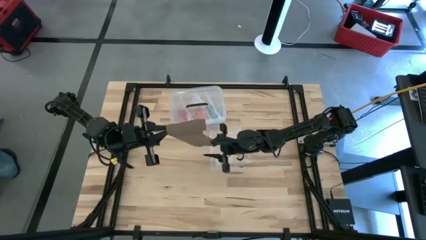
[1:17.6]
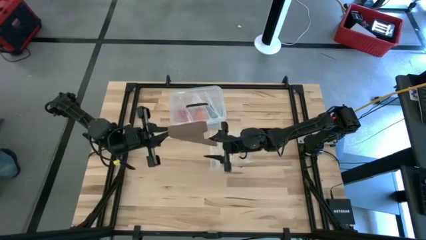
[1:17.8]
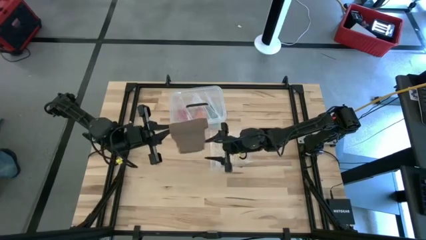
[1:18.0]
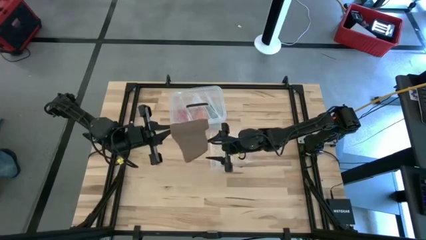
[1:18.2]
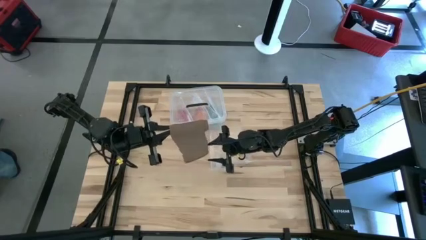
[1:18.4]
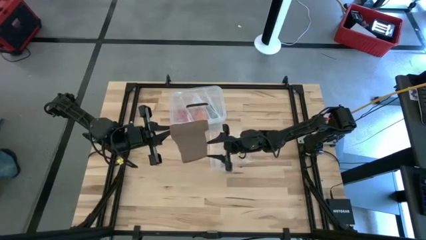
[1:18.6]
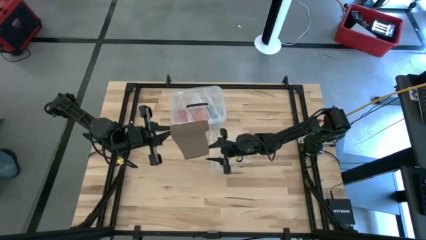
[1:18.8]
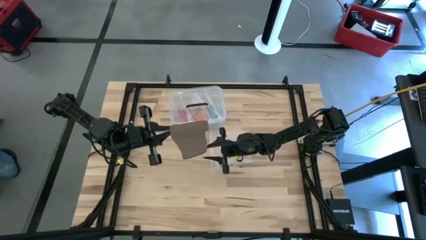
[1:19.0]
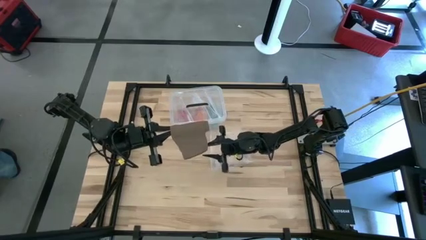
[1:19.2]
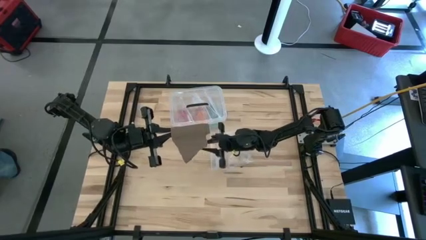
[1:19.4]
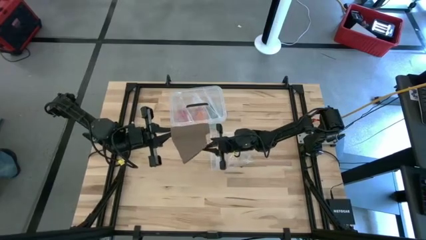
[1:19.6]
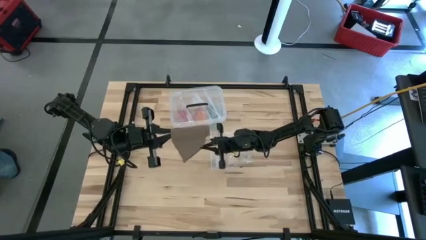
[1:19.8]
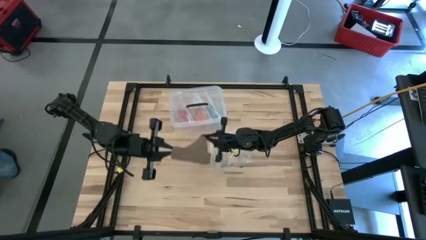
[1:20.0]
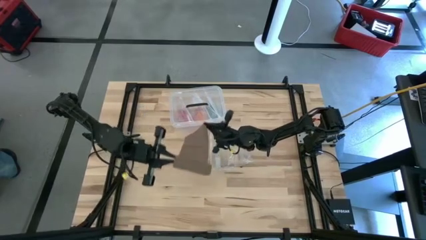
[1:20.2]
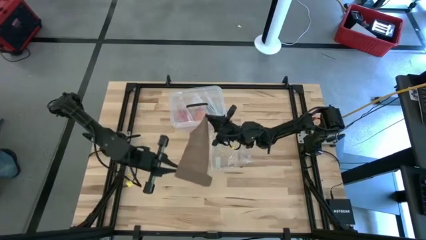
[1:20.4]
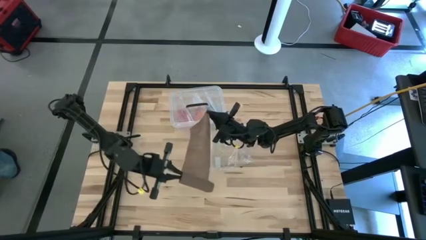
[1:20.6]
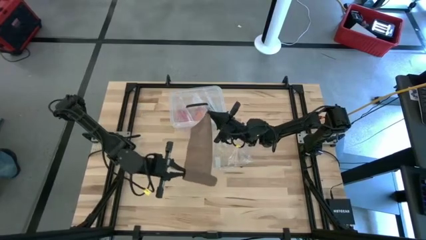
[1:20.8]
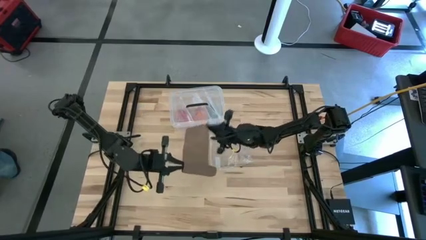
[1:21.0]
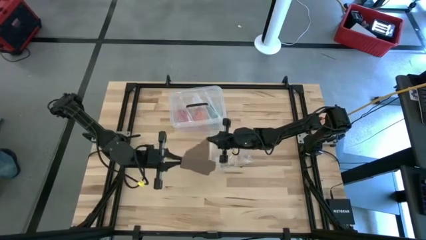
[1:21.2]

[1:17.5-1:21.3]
Task: Roll bandage
Roll the brown bandage

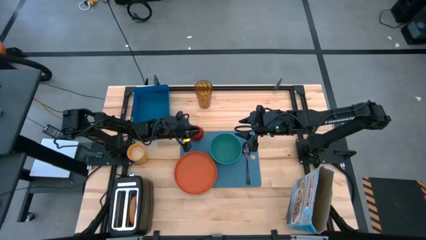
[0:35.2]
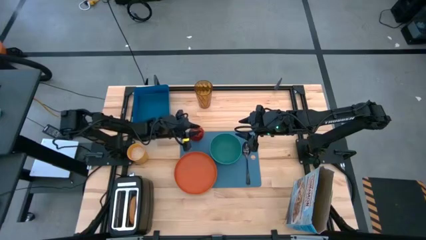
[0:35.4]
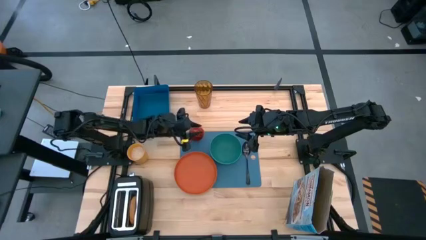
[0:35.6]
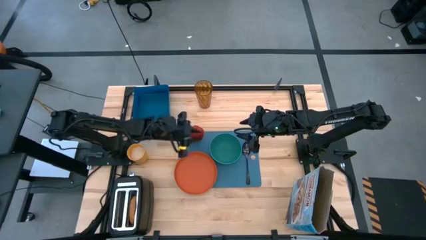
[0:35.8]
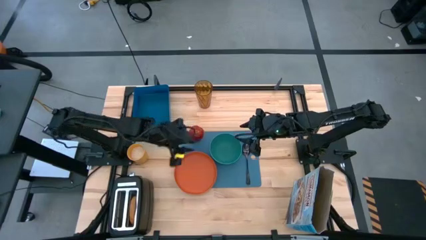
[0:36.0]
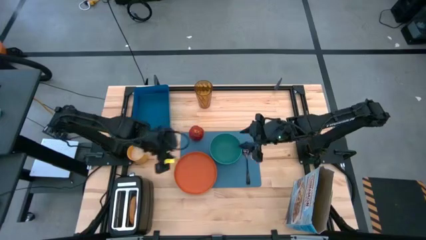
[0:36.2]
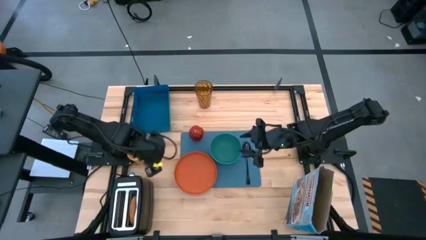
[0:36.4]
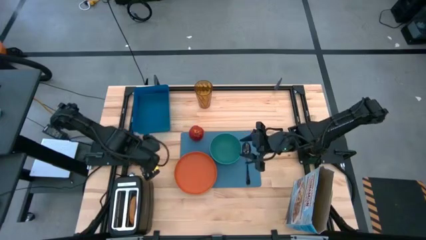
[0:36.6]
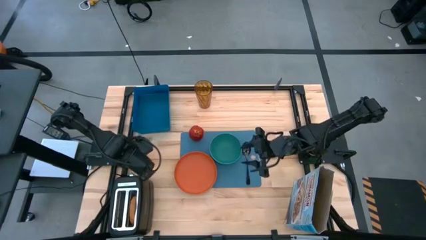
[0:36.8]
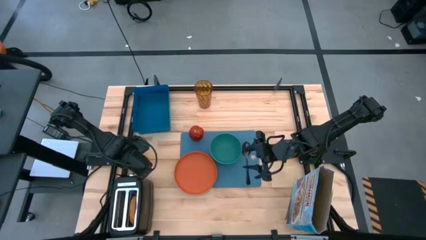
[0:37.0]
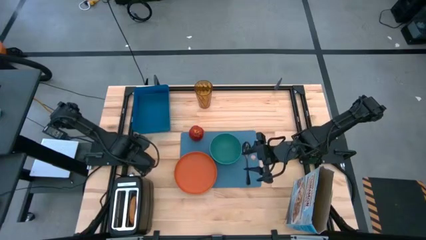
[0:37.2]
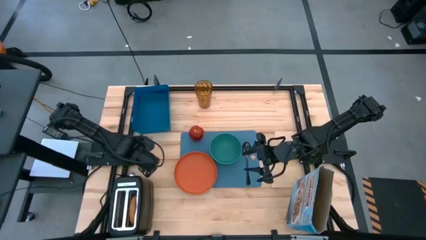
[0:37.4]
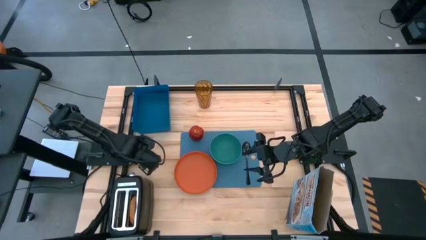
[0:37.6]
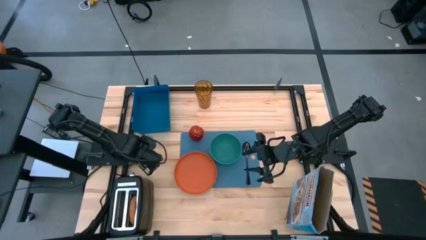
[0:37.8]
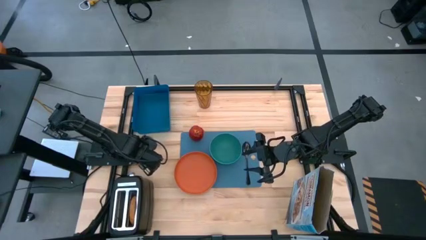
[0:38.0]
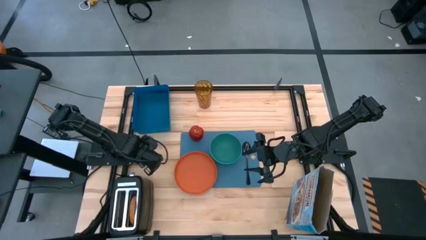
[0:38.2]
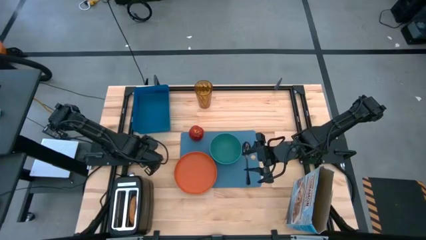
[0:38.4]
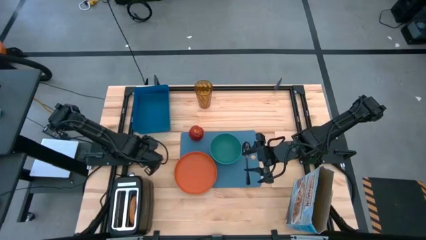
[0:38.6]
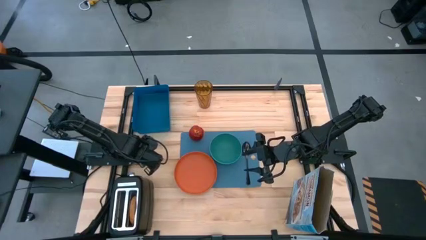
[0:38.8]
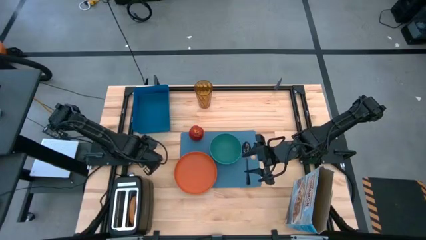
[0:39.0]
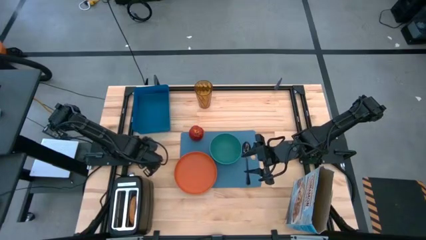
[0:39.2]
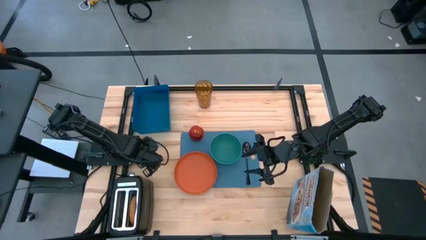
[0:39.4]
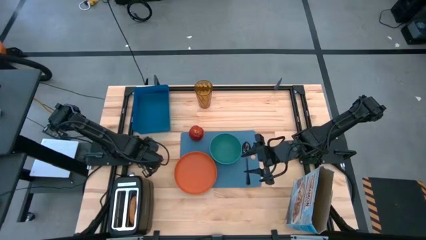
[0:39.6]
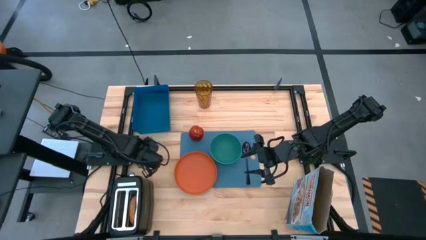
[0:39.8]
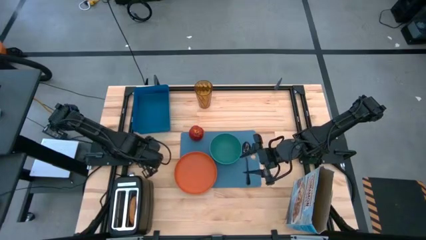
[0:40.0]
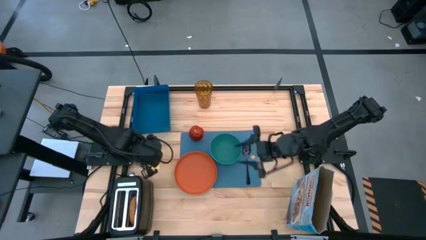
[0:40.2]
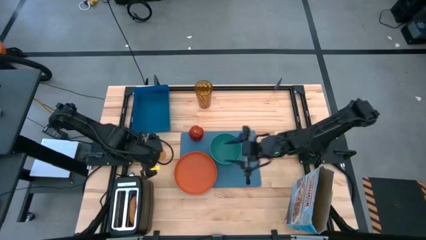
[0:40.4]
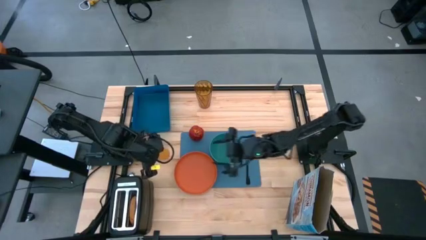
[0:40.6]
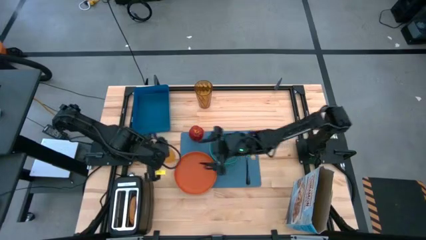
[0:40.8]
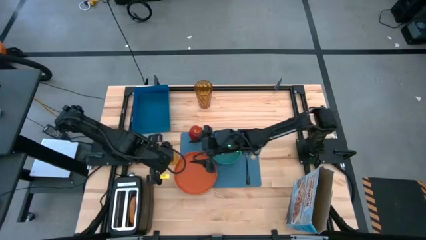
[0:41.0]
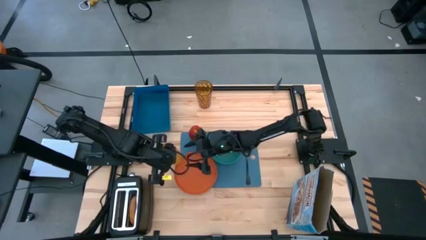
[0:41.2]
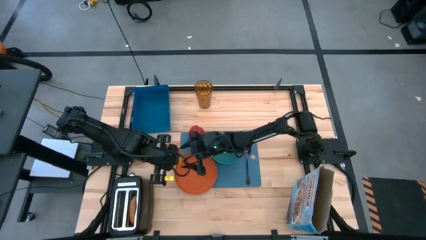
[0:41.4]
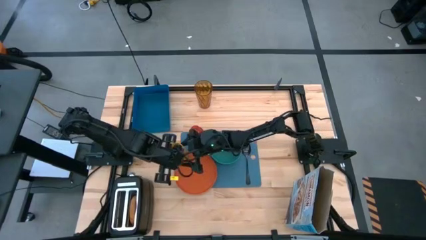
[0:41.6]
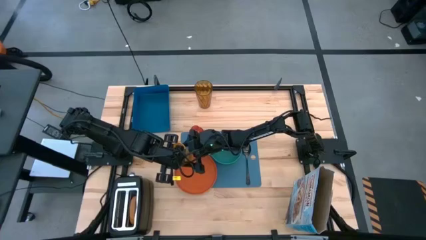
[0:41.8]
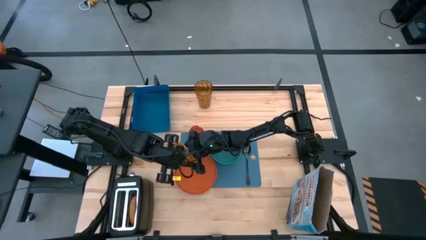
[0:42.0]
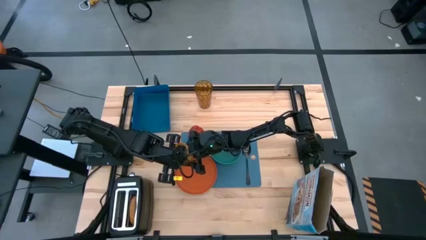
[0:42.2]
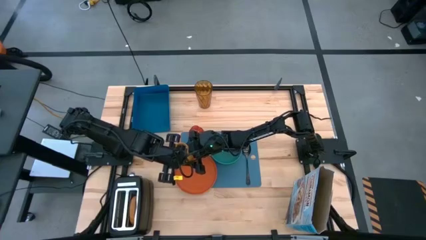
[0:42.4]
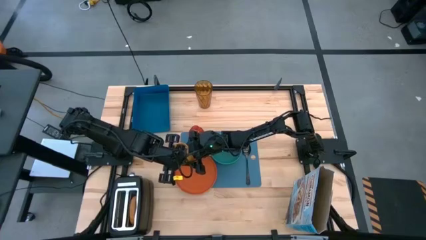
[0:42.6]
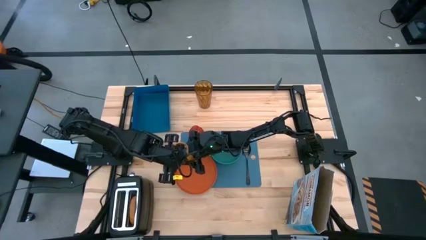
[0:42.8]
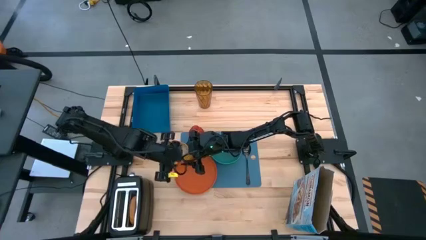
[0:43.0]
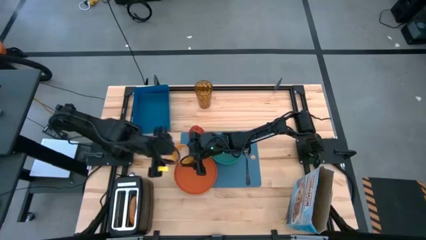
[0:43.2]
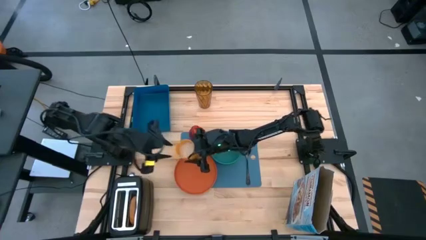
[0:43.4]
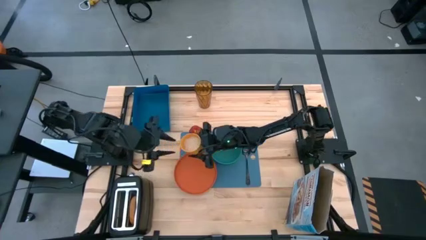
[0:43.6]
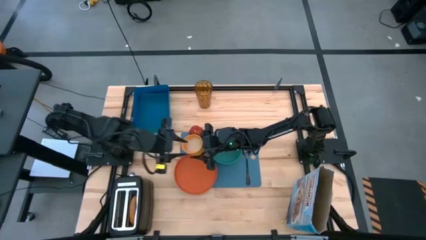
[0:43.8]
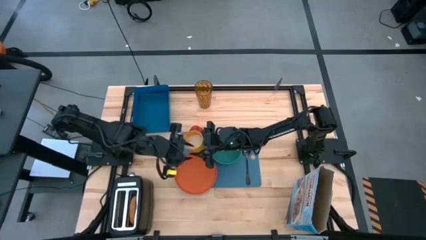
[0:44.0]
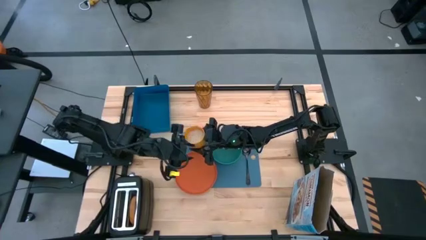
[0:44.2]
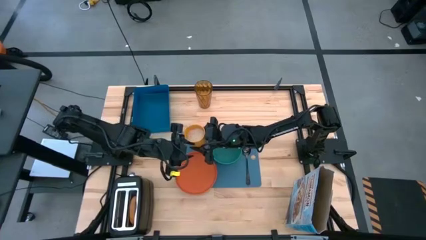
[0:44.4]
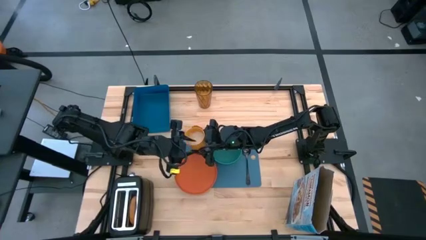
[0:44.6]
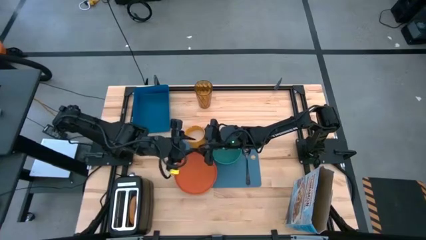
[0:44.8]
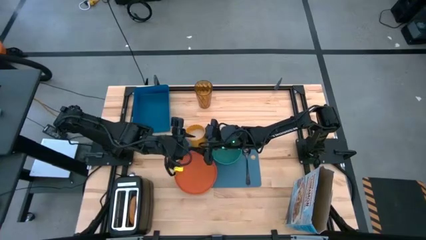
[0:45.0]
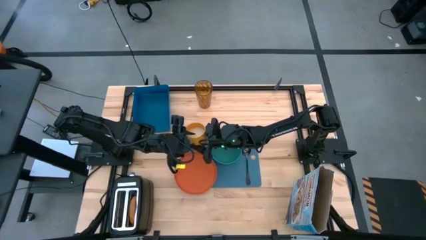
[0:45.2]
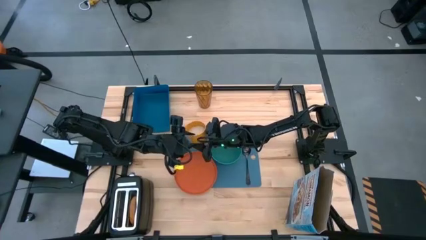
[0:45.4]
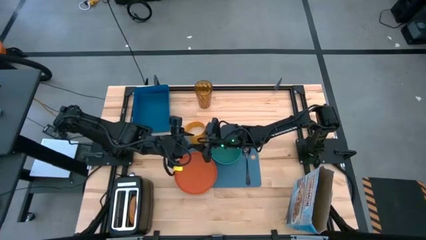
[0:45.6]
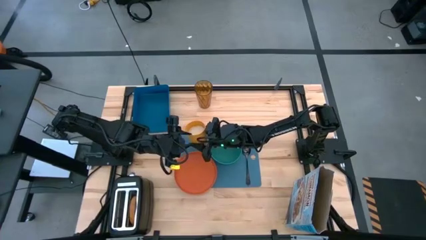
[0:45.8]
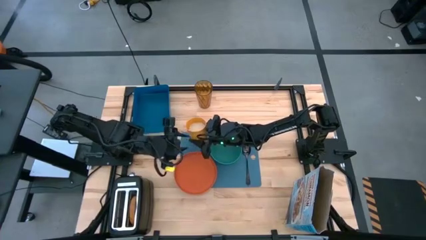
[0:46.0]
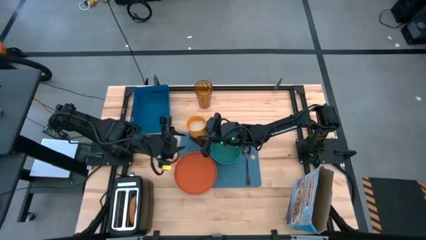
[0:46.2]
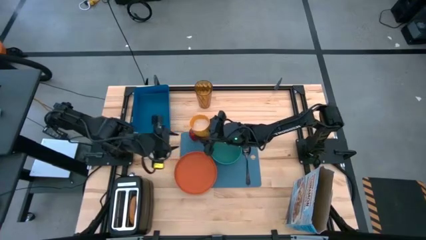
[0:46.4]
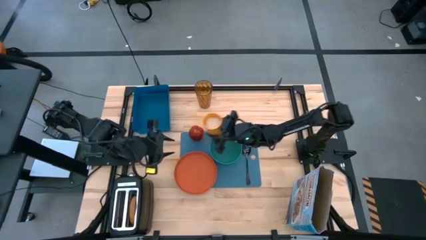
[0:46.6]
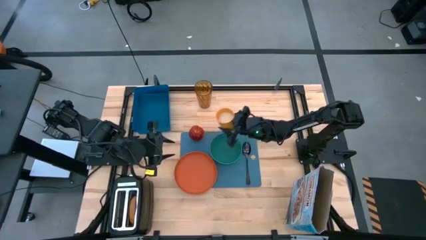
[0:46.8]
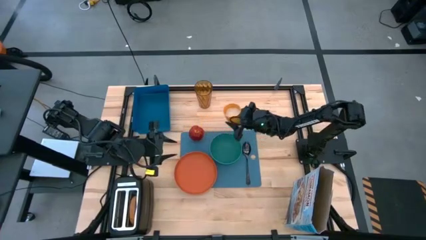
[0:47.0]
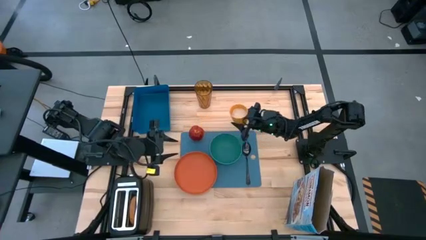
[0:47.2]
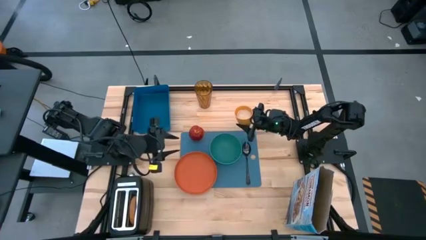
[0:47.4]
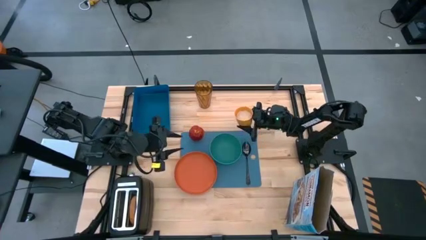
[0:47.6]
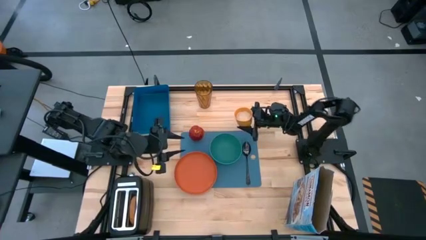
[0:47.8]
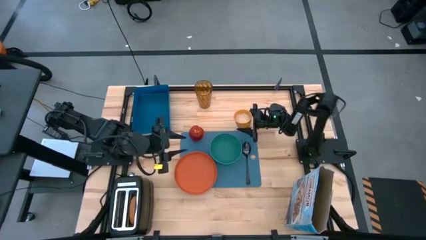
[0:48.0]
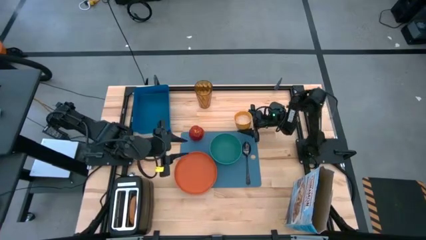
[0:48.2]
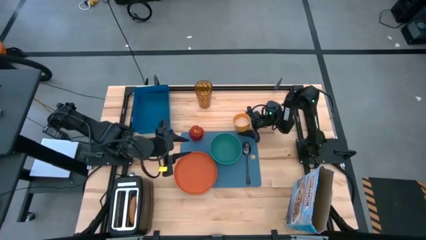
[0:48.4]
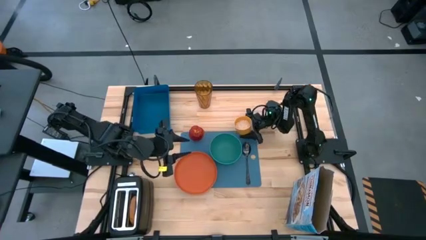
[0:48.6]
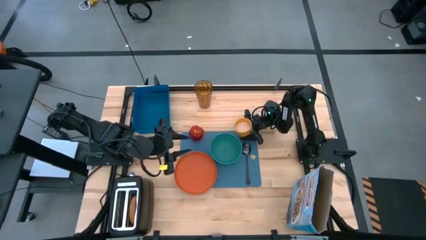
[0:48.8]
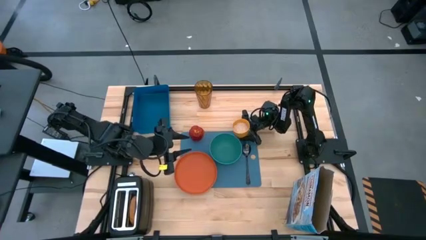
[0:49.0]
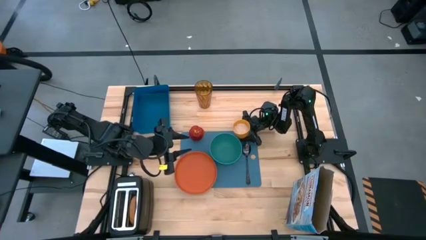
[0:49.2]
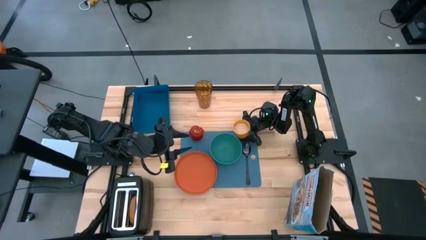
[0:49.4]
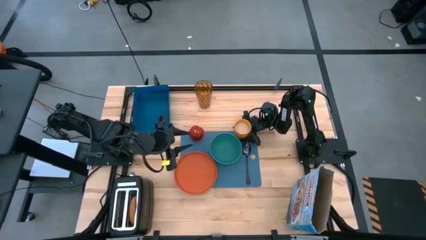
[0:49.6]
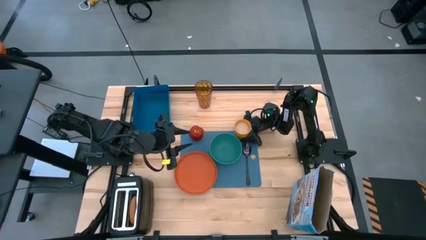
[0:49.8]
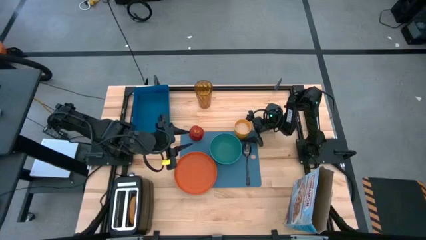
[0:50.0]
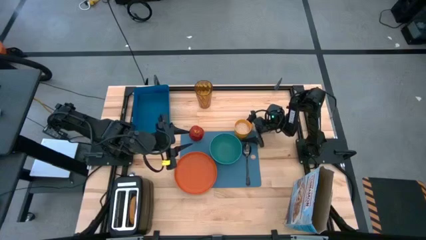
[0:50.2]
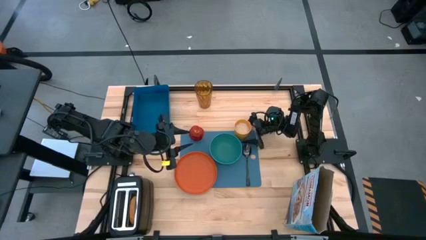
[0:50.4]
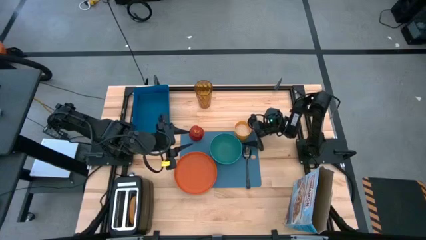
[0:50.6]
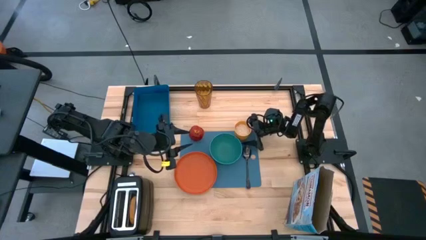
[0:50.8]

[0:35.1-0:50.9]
Task: Arrange a breakfast setting
Put the yellow cup of milk on the blue cutting board to the top right of the green bowl
